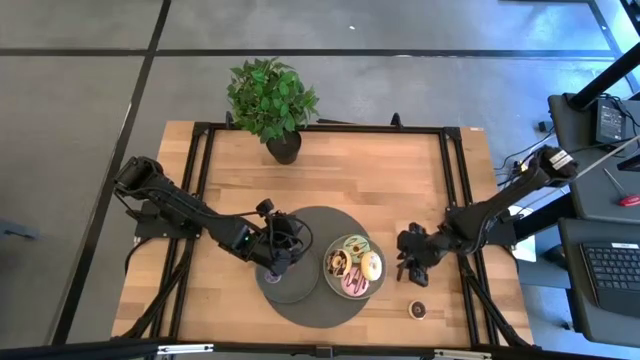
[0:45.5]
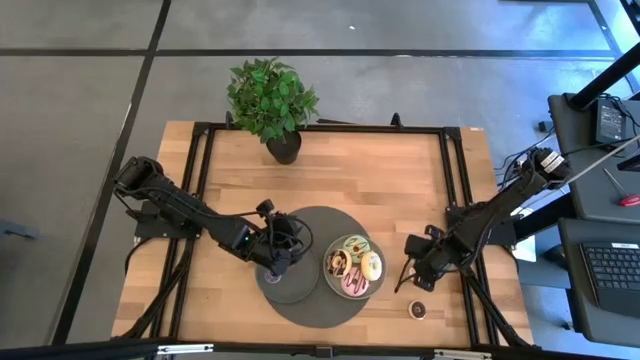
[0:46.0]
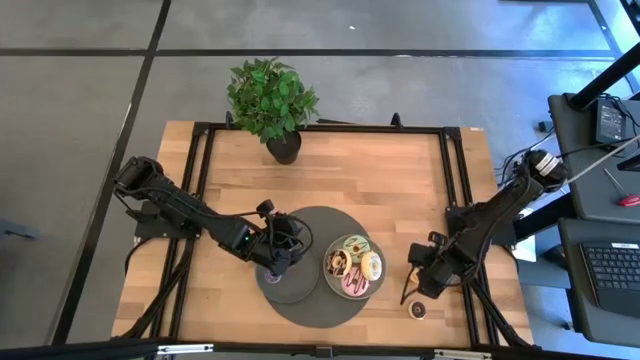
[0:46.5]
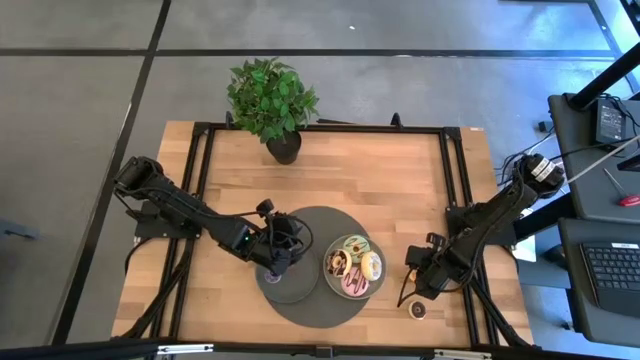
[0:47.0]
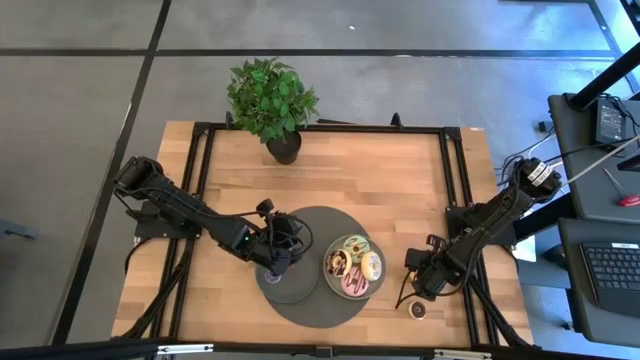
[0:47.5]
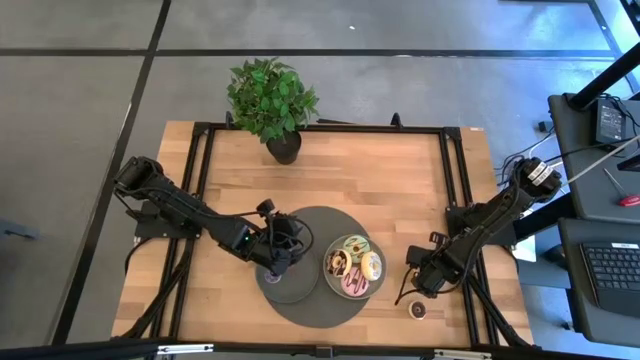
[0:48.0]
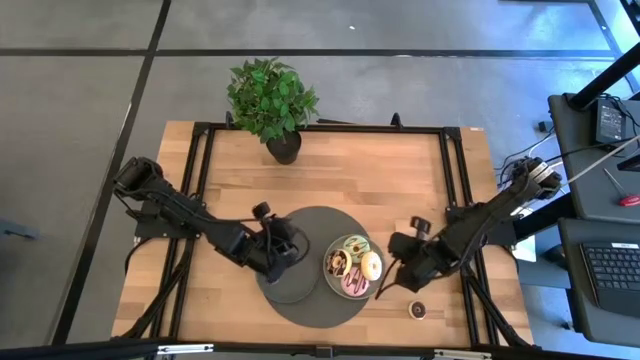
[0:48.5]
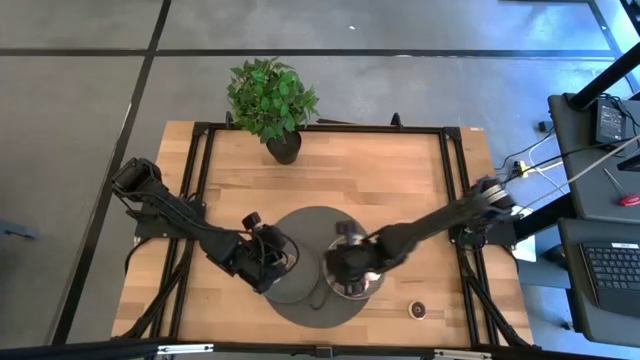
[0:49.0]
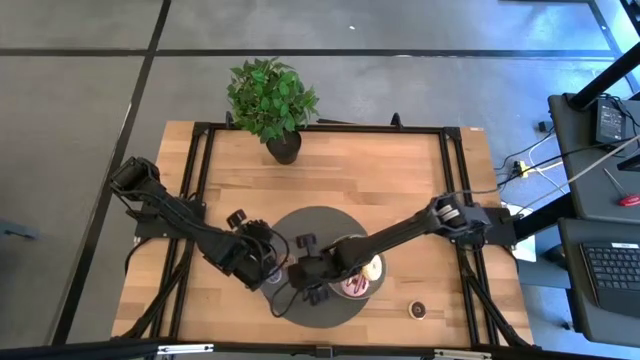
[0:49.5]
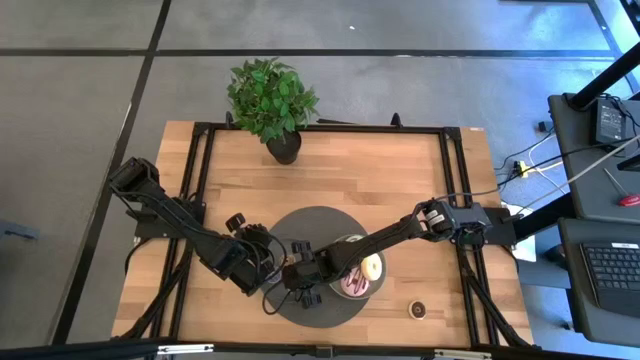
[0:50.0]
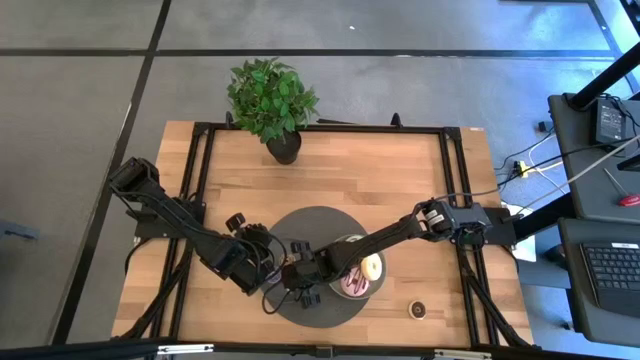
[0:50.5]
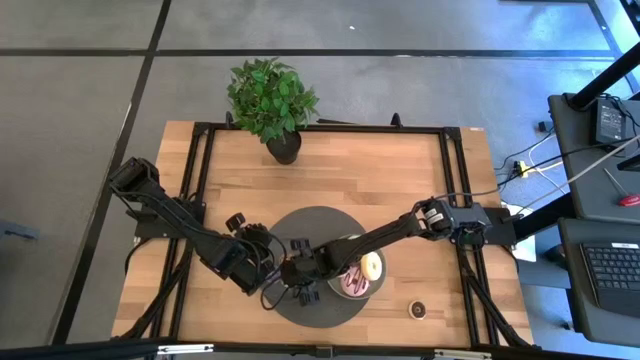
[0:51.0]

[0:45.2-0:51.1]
Task: Pick & Place donuts
Put the orange donut on the dark gray plate

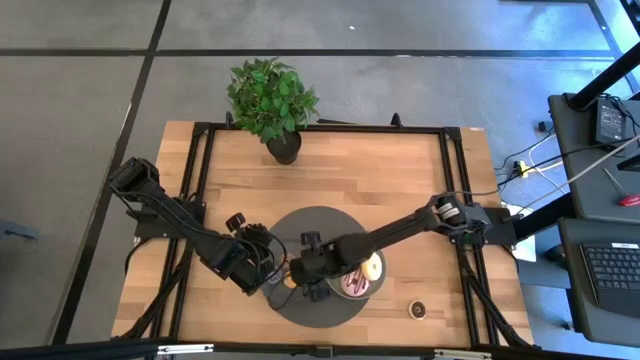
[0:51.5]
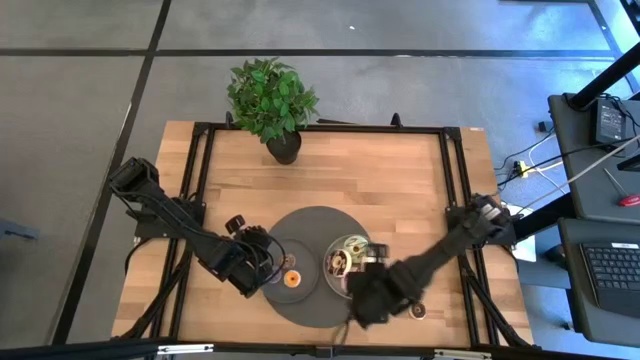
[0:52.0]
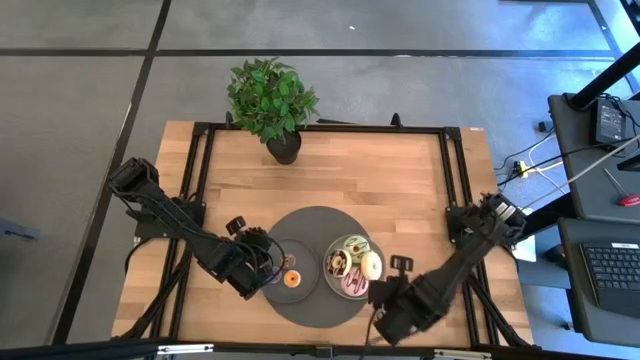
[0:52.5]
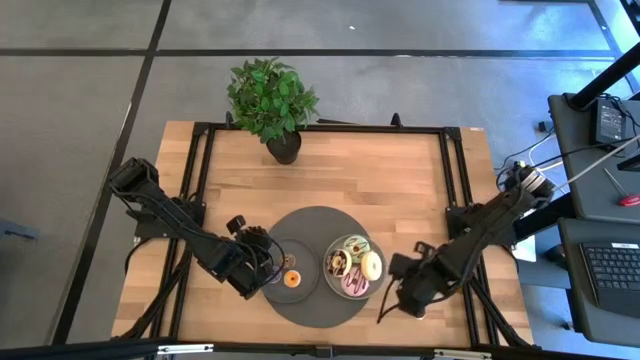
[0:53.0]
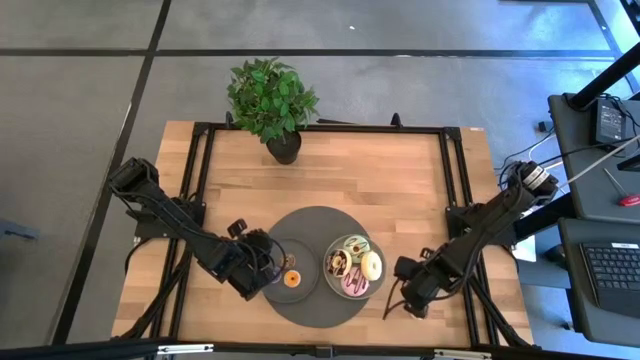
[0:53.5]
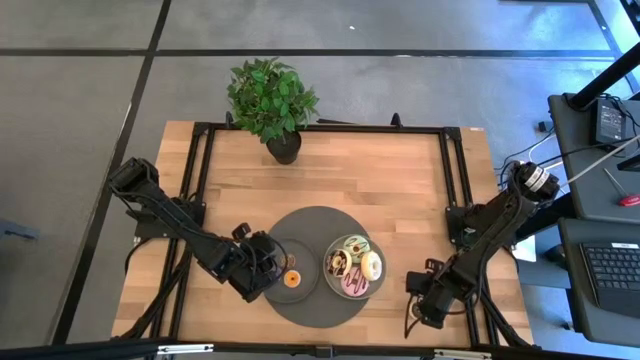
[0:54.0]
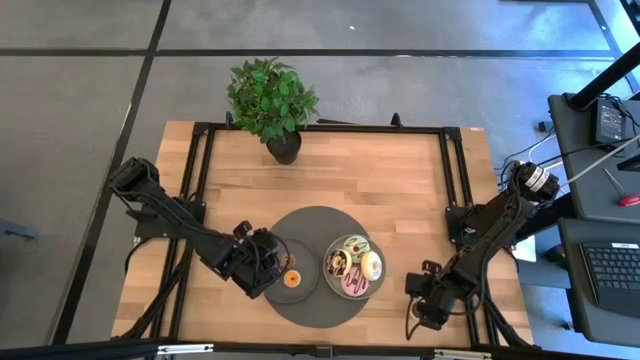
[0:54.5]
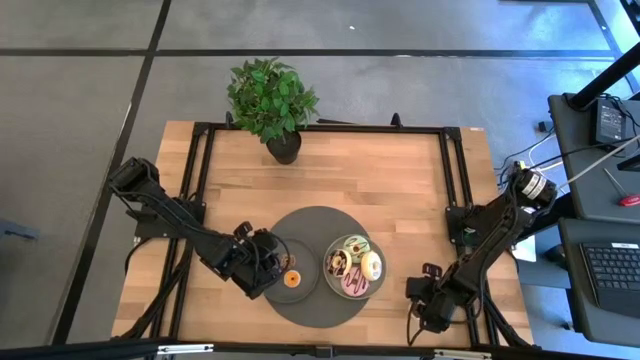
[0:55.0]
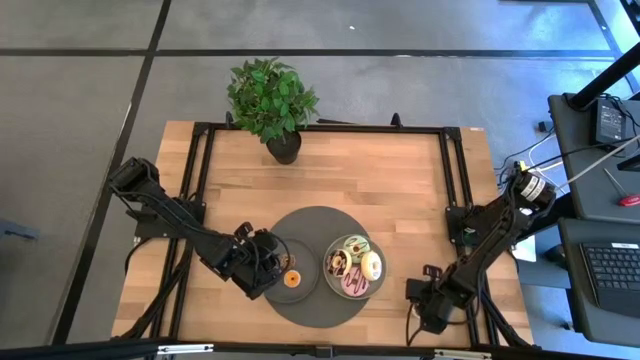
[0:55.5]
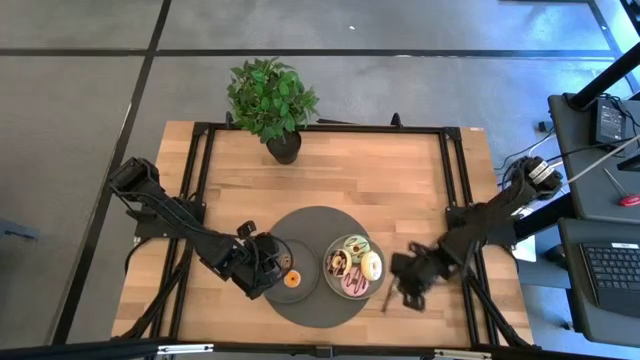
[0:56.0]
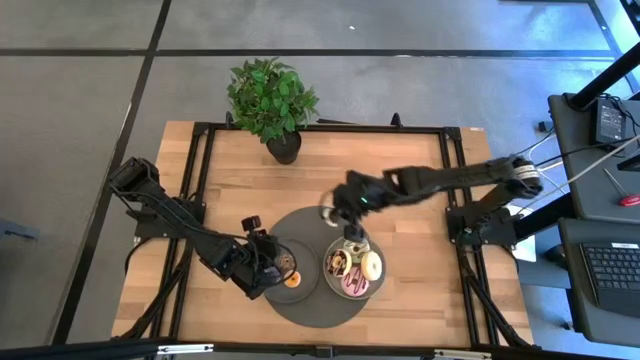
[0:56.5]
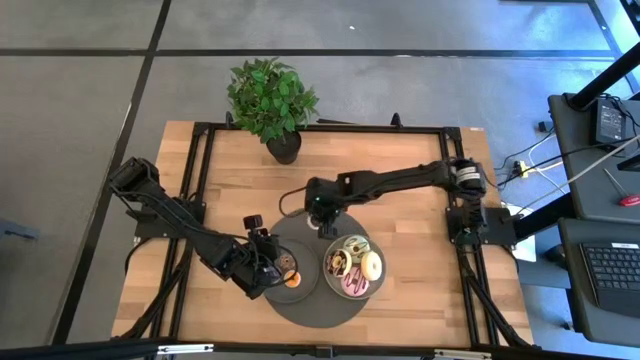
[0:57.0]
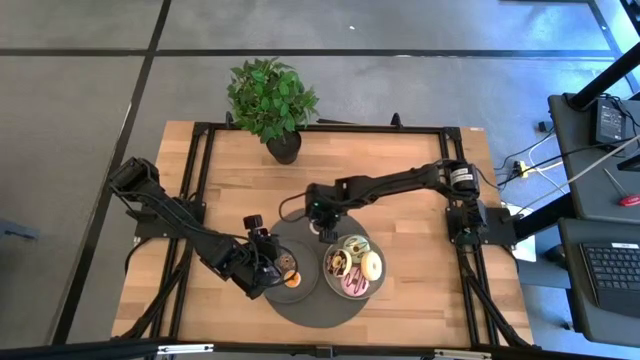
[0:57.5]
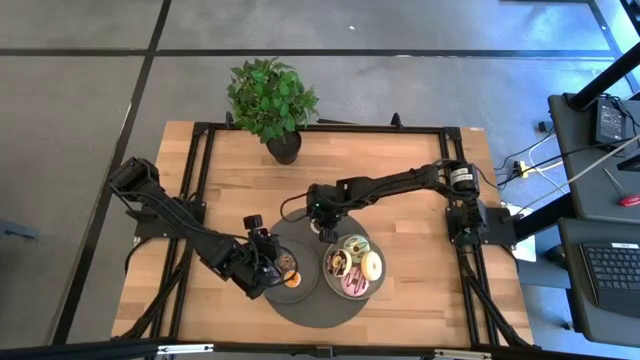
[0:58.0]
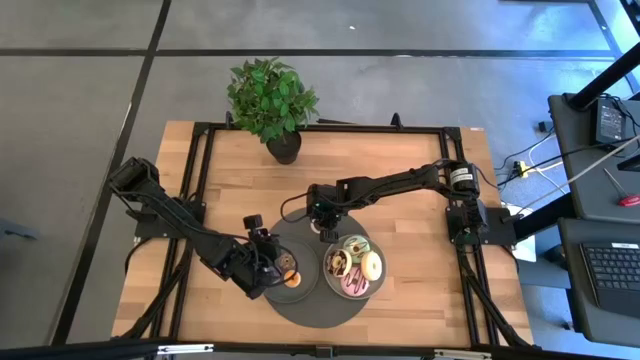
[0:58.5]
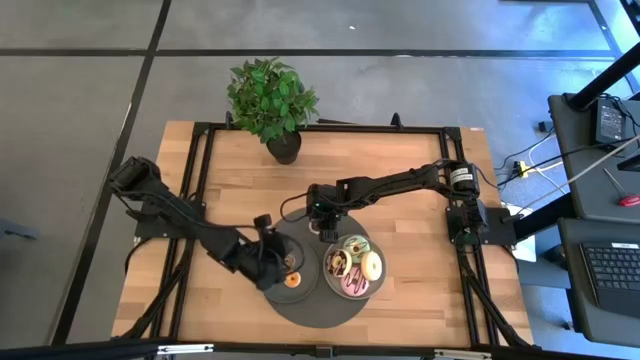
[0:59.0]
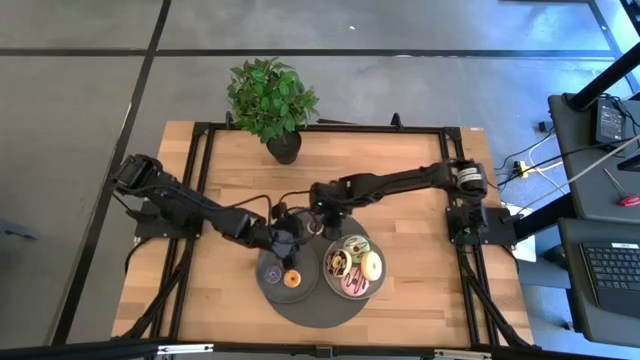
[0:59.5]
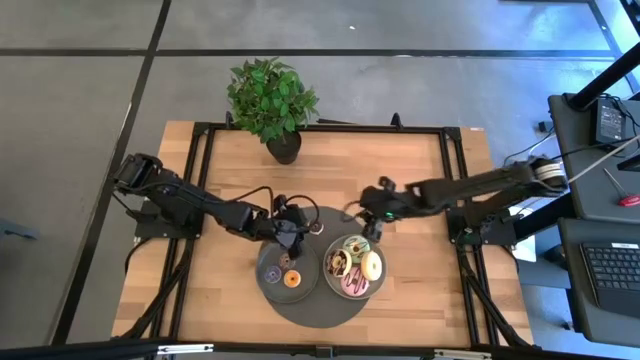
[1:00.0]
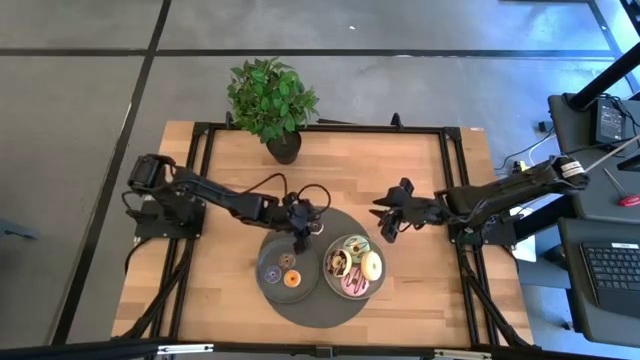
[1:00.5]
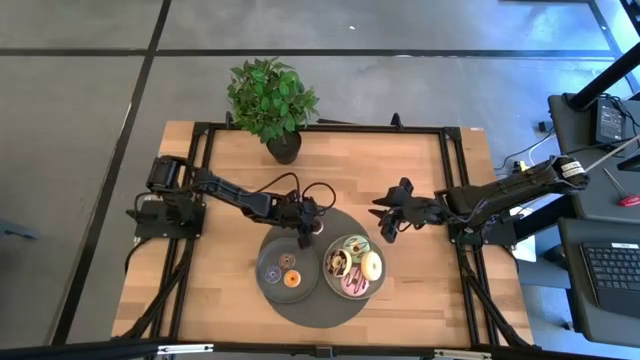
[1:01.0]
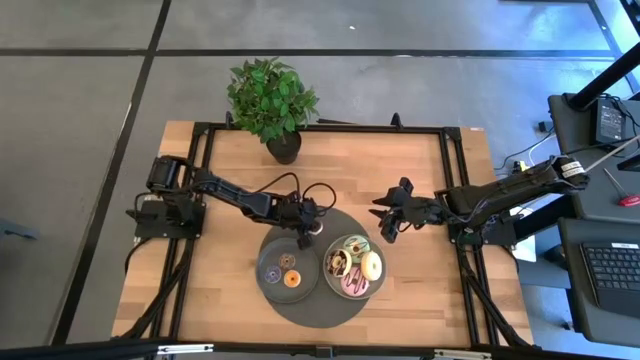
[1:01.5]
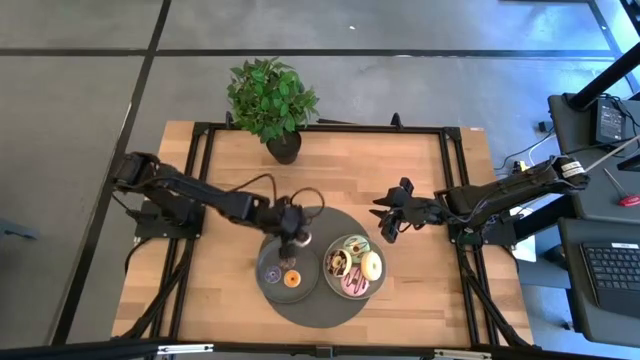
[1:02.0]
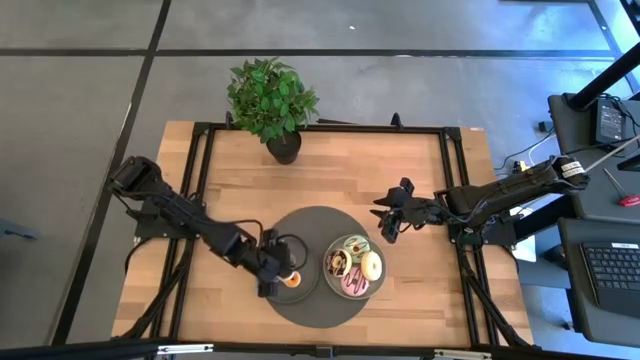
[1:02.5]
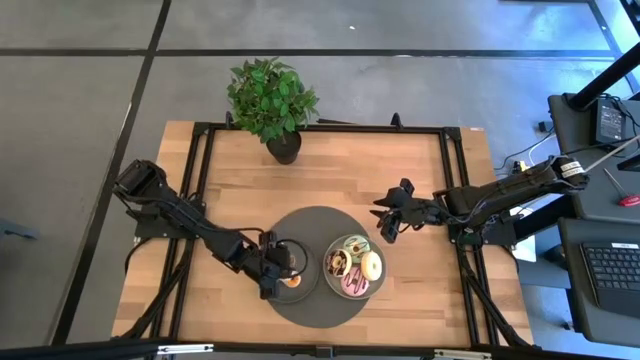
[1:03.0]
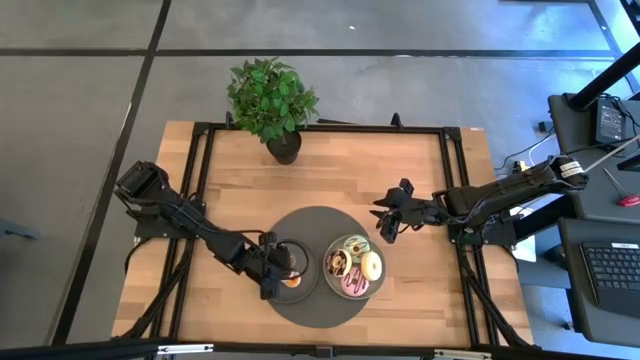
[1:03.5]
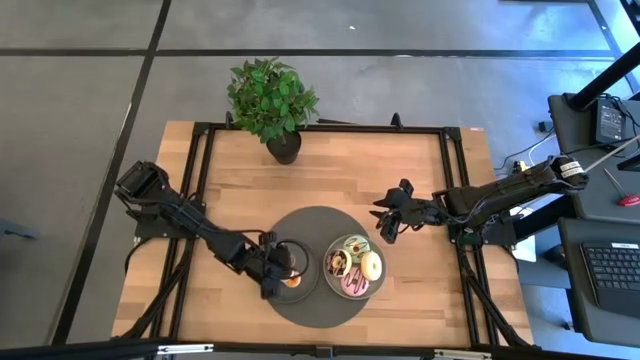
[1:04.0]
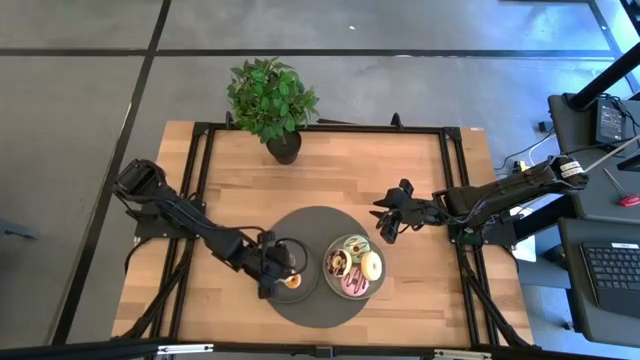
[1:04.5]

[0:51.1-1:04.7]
Put the black donut on the dark gray plate

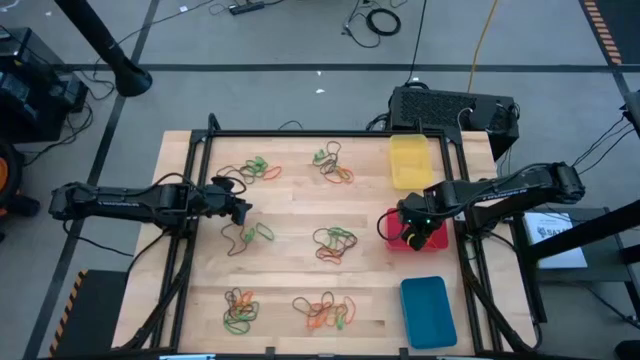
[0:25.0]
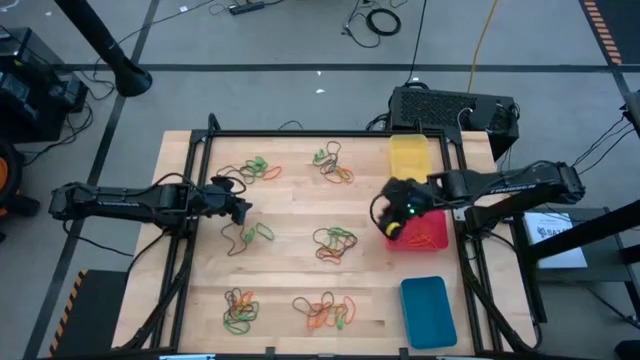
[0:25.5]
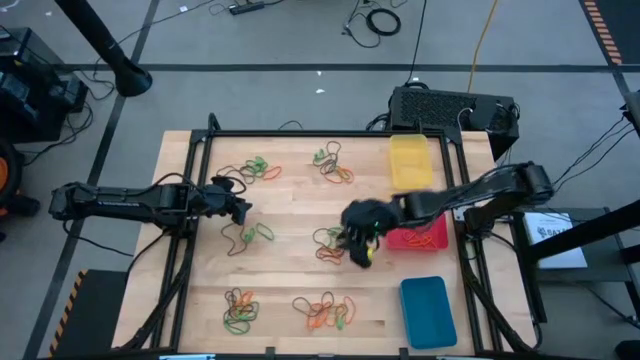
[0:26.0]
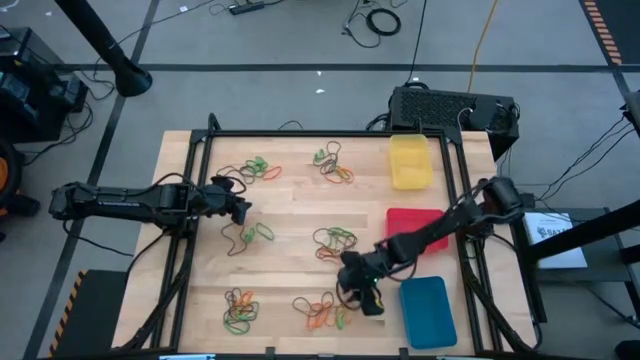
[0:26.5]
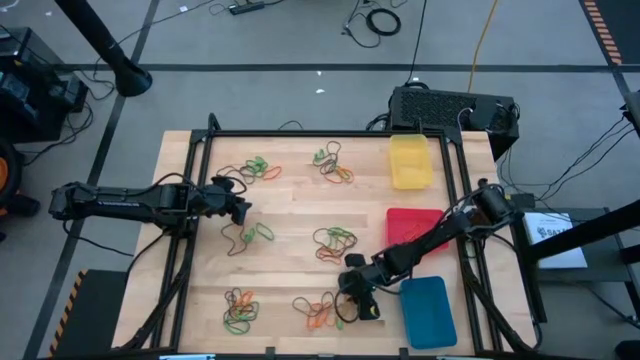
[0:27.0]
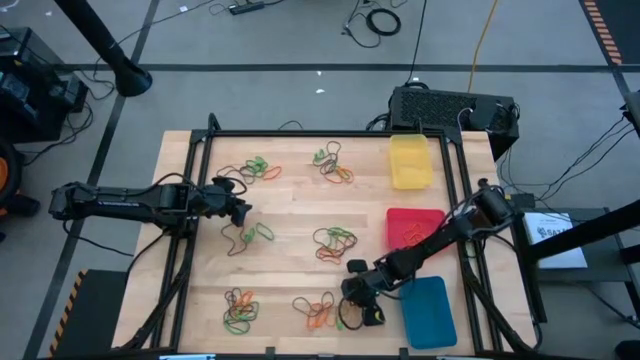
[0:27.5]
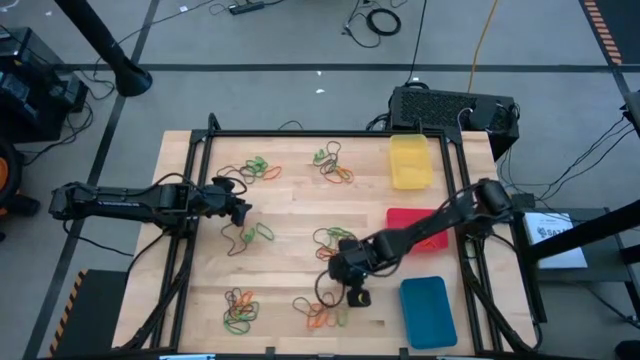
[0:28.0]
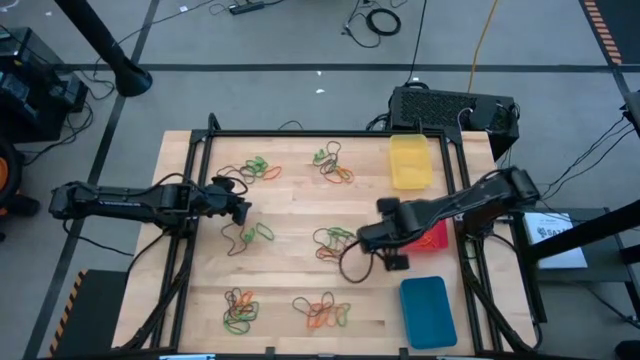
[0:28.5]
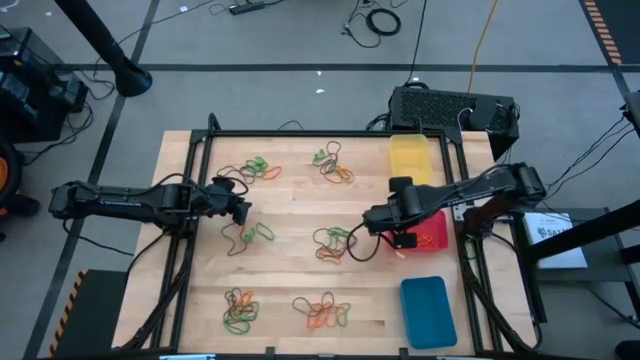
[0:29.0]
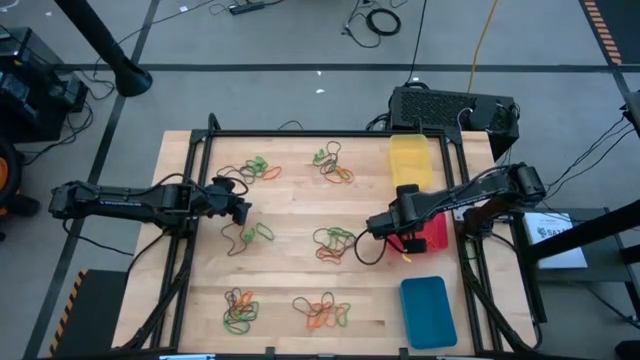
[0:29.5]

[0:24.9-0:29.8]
Task: Sort rubber bands into baskets
Put the orange rubber band into the red bin
